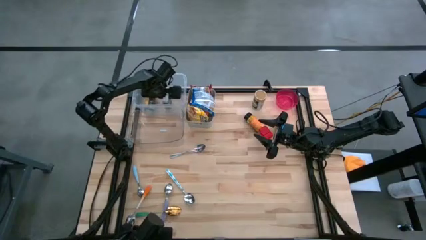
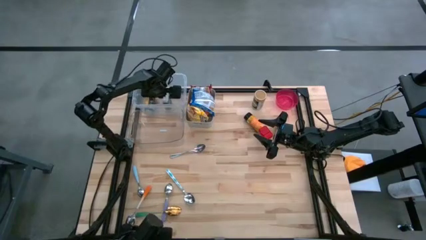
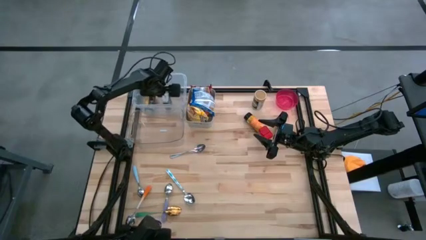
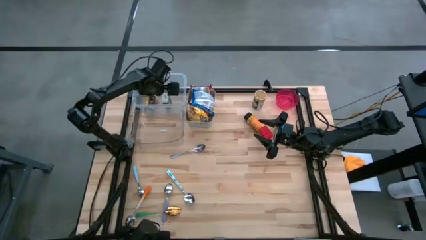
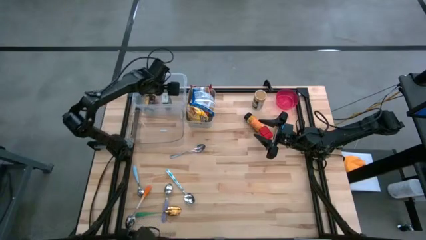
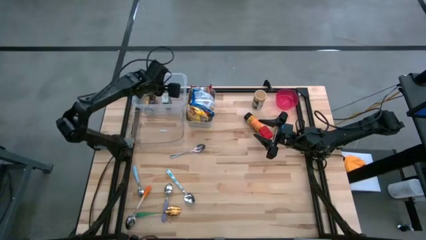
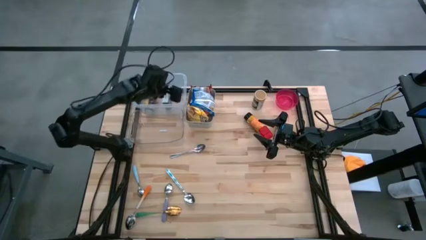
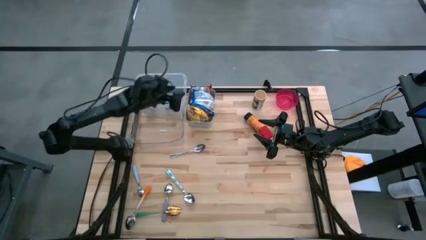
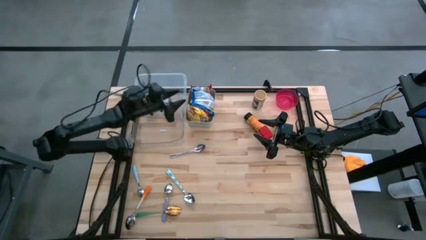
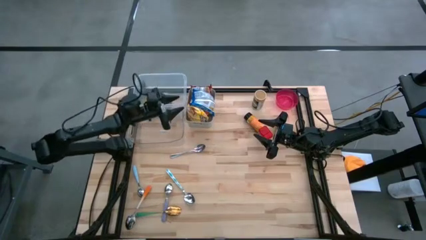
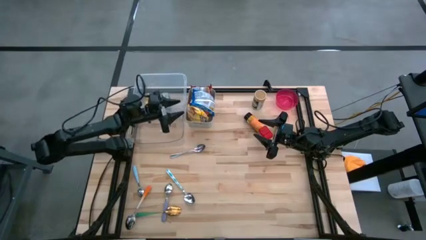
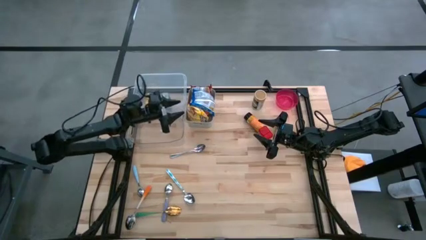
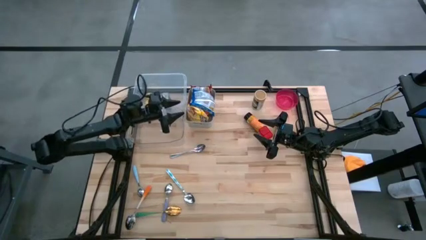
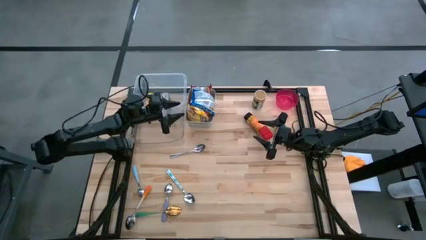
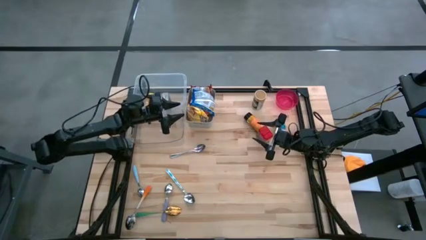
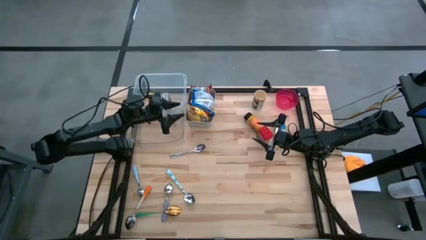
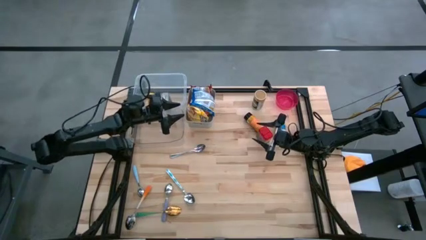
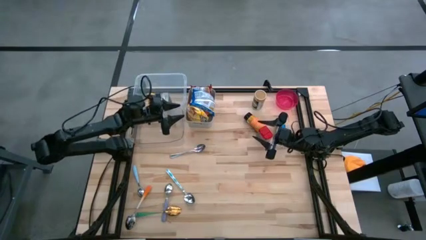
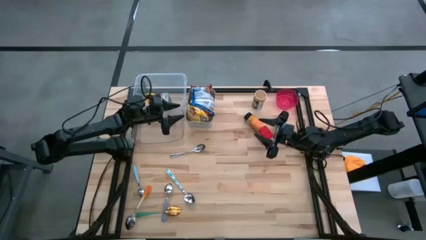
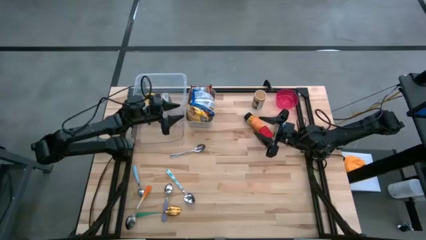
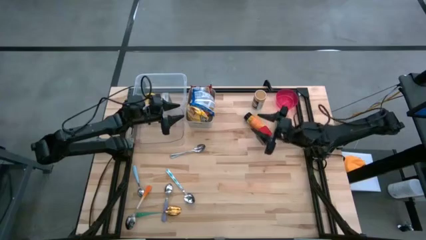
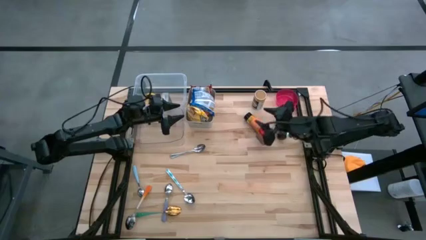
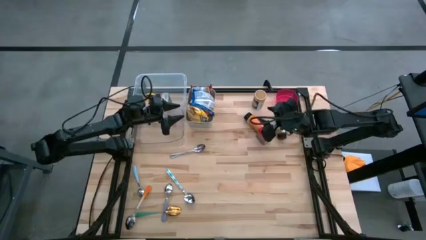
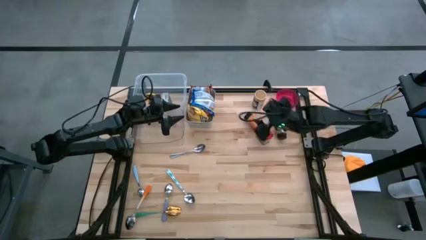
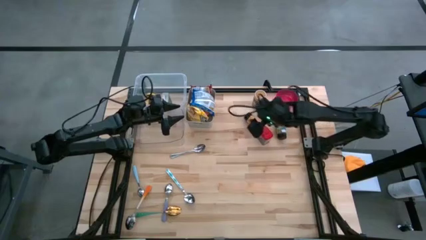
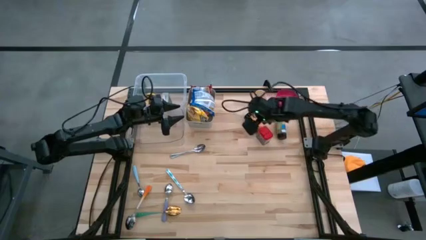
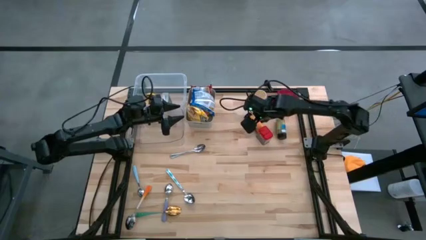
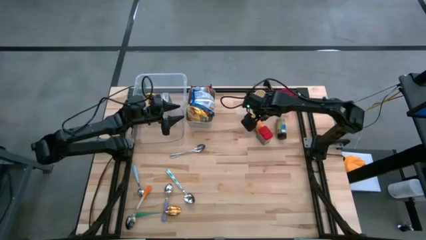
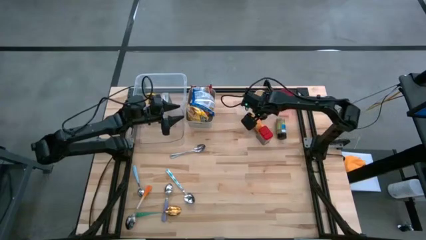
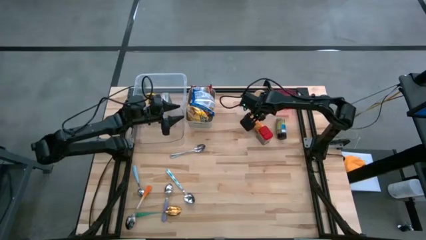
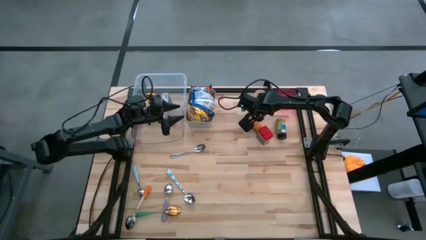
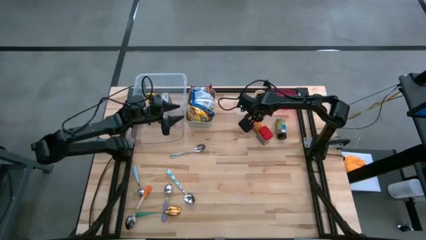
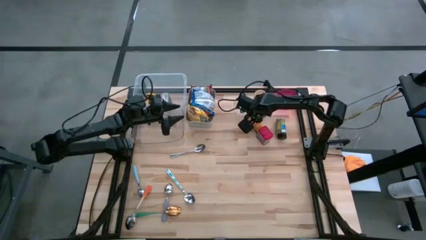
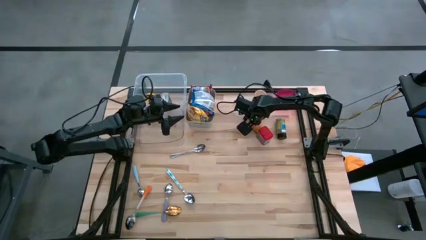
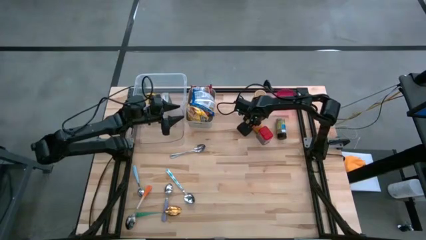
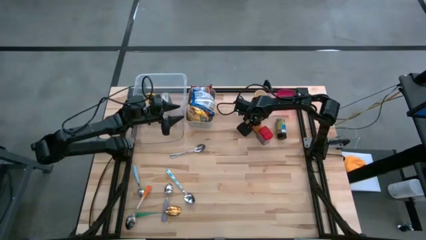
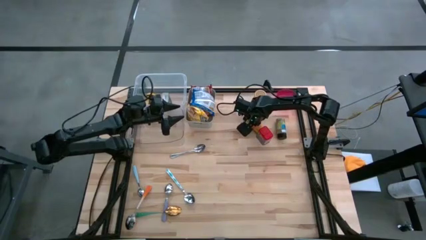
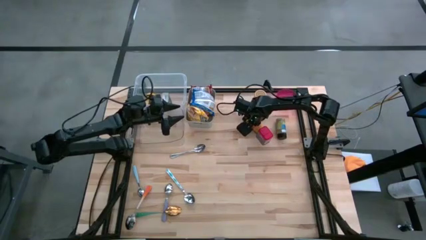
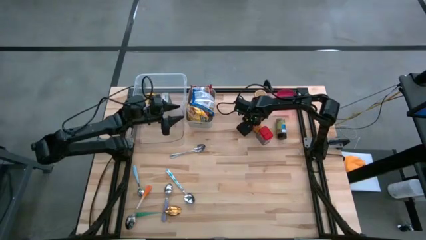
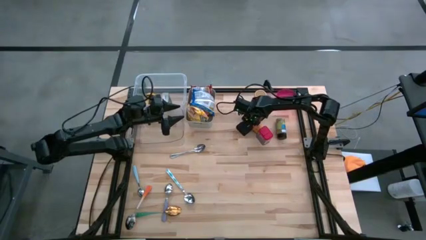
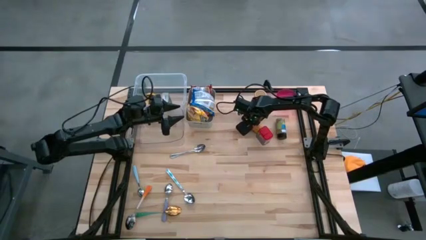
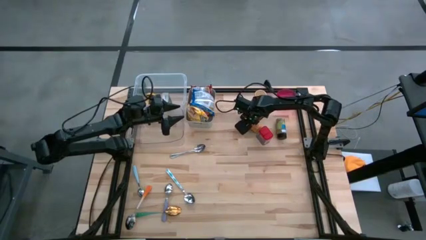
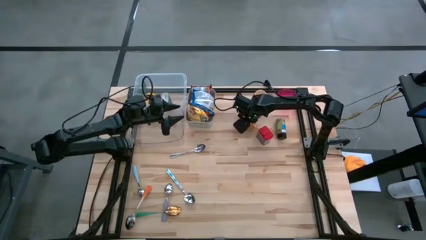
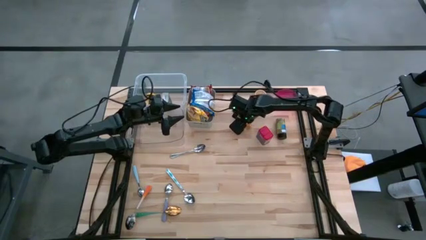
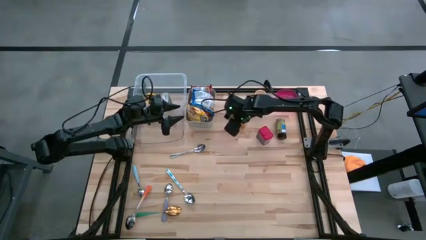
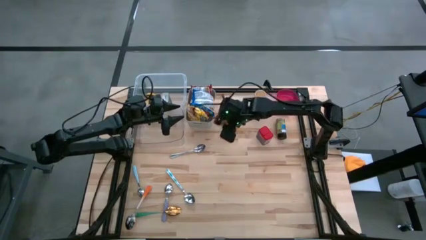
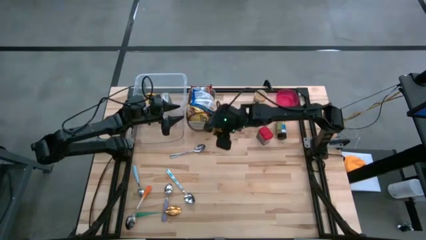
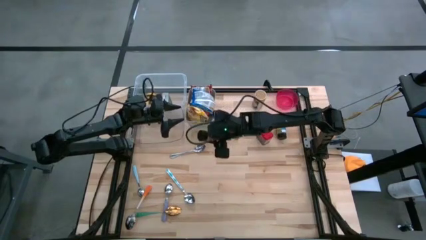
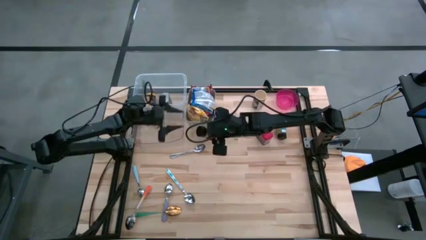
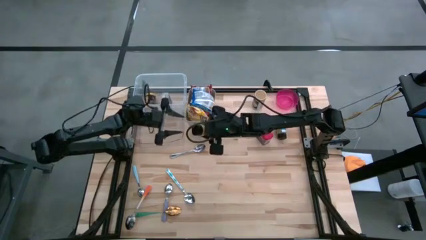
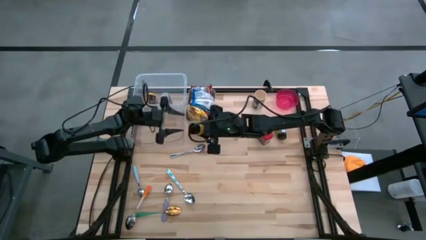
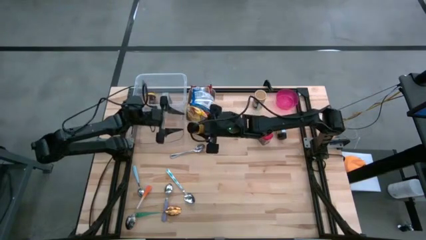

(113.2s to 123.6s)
Put the orange seasoning bottle into the white bin

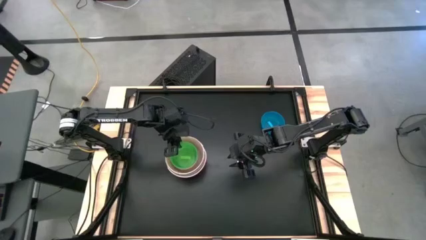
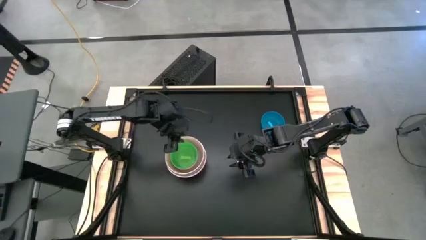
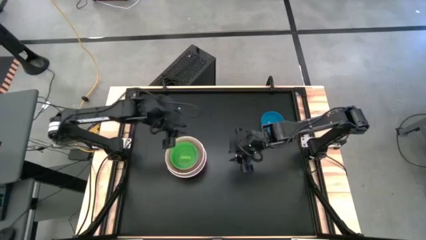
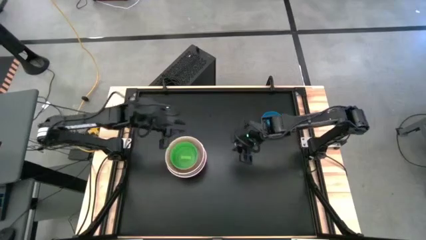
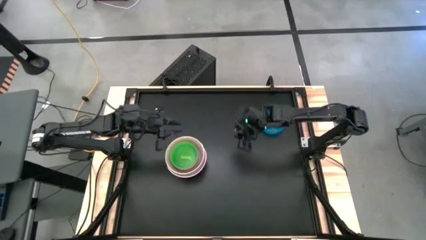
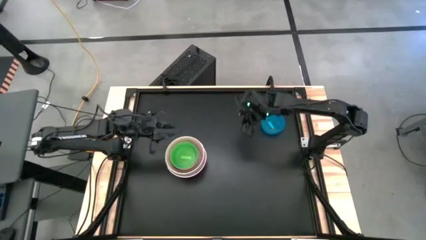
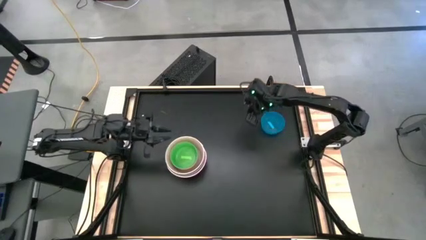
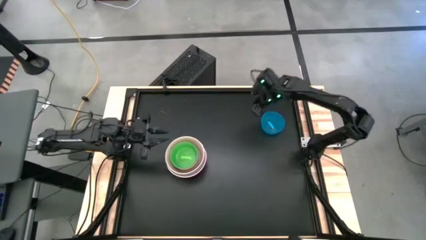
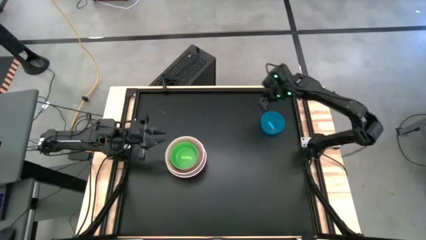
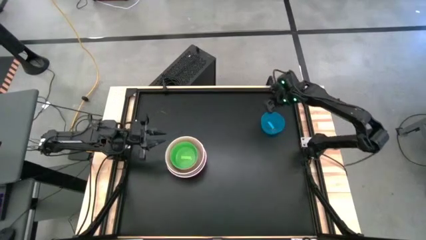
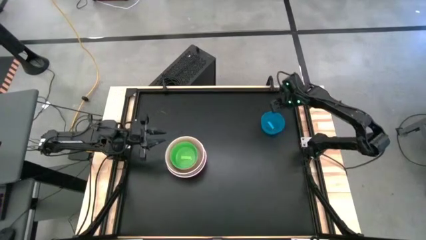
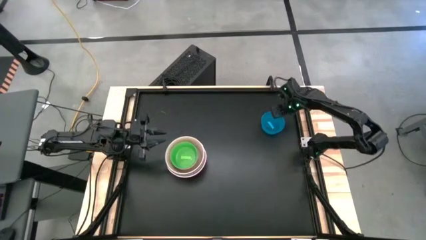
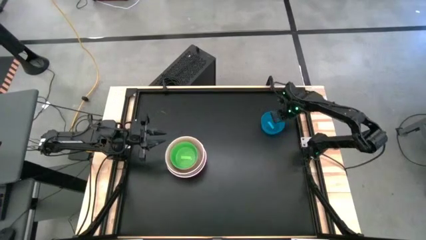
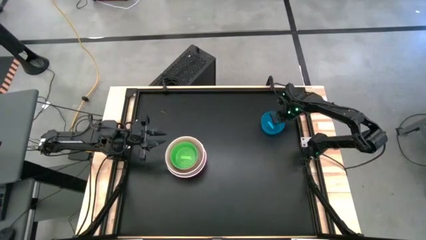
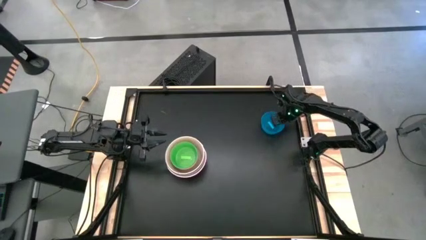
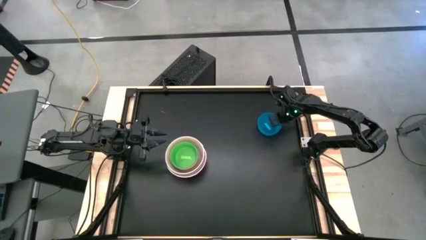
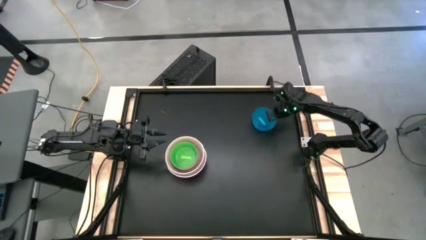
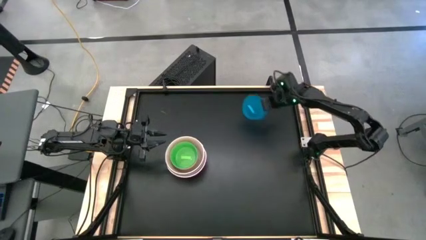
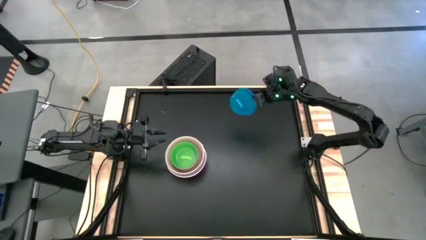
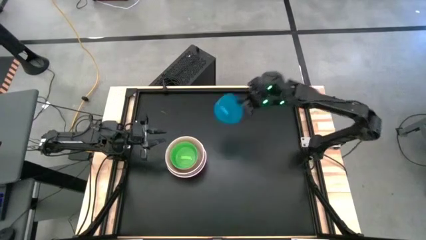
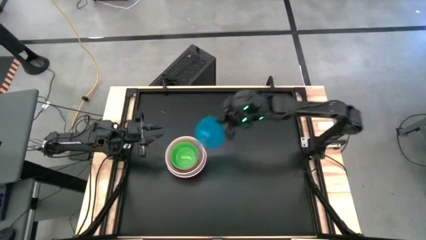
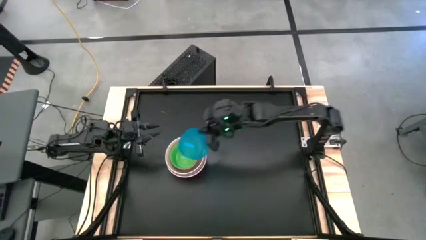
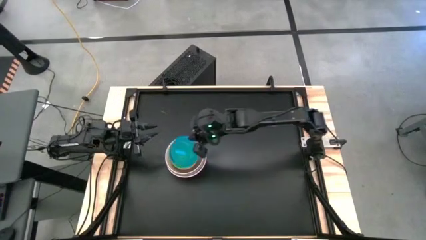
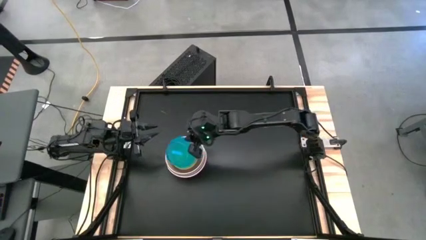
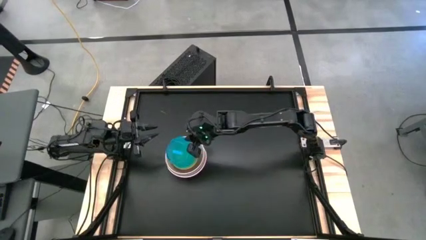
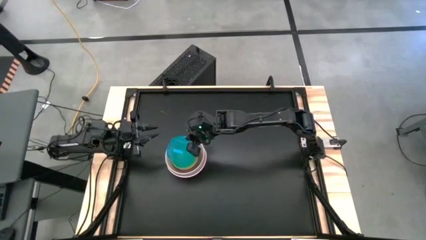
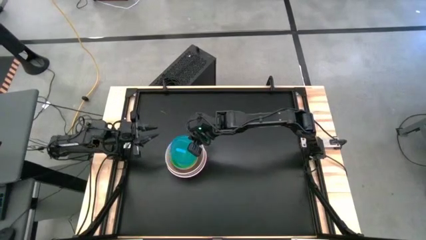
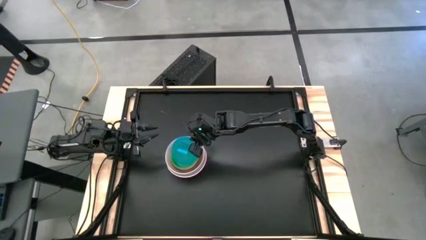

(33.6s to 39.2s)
Stack the small blue bowl on top of the green bowl
